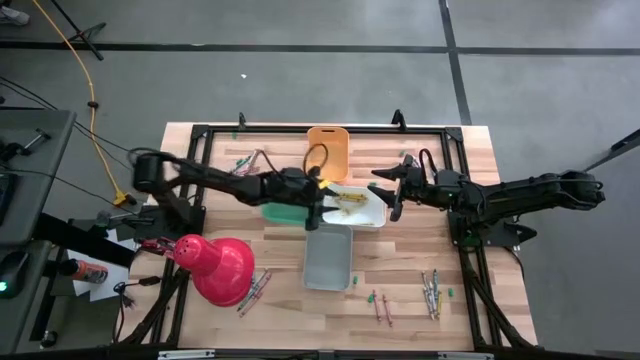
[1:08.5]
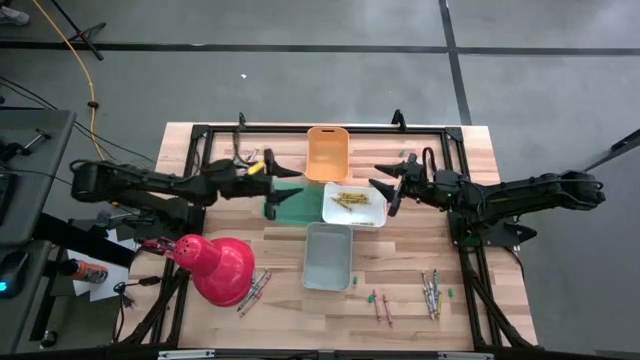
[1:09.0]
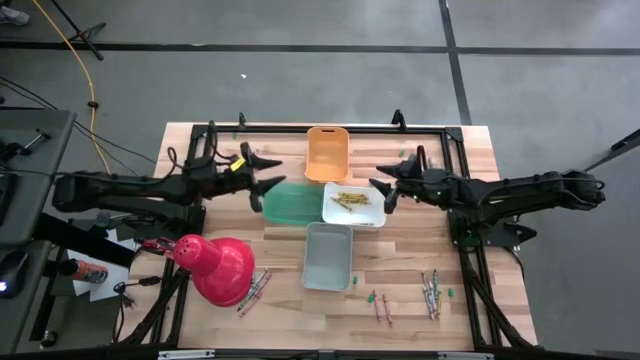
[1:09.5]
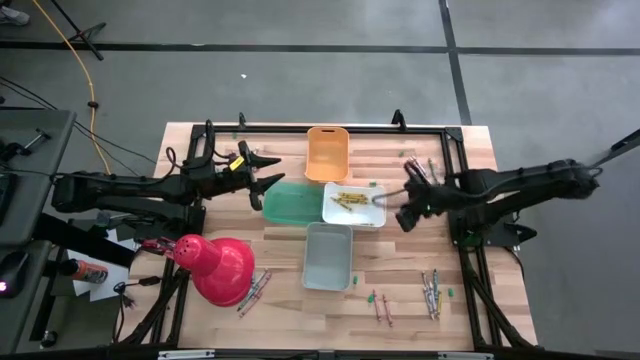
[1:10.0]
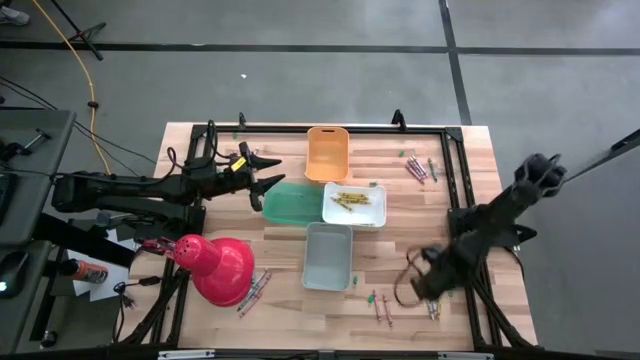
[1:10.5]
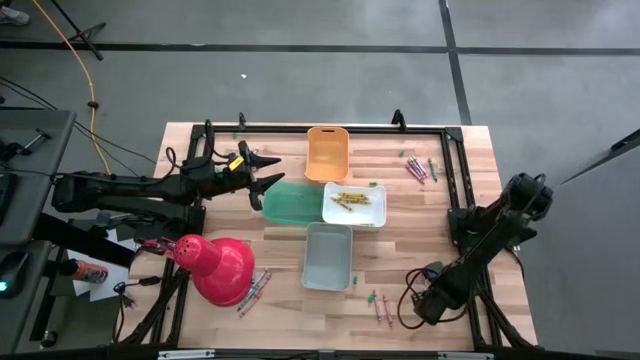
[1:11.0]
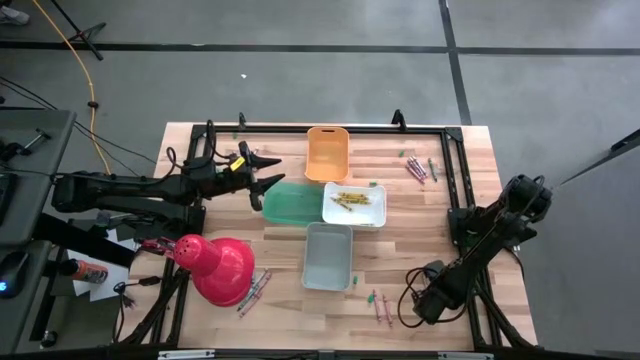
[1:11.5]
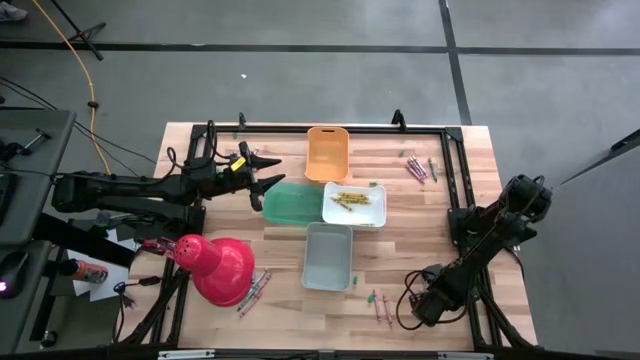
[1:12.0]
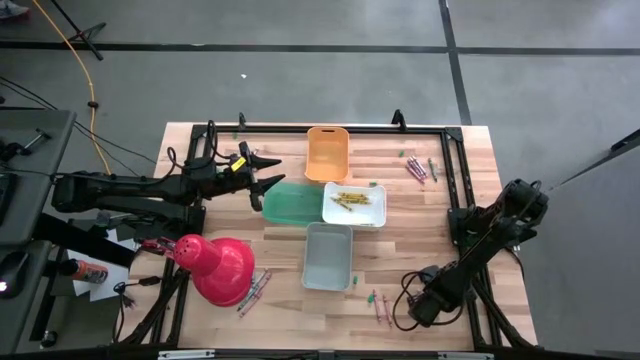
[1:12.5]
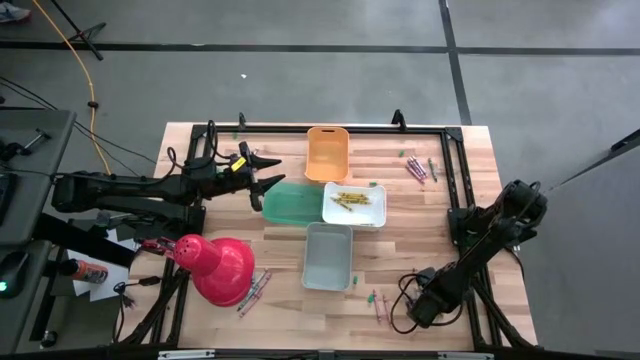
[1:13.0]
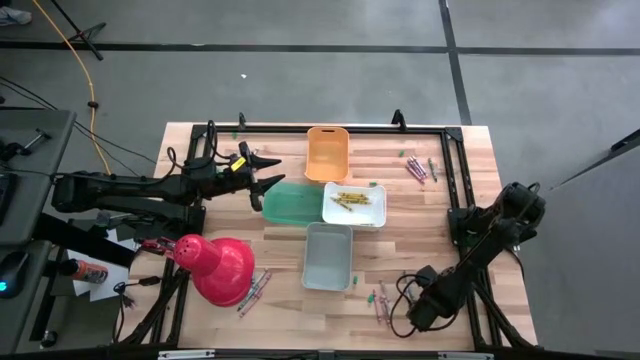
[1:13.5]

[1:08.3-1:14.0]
Task: Sort crayons
Put the yellow crayon into the white bin

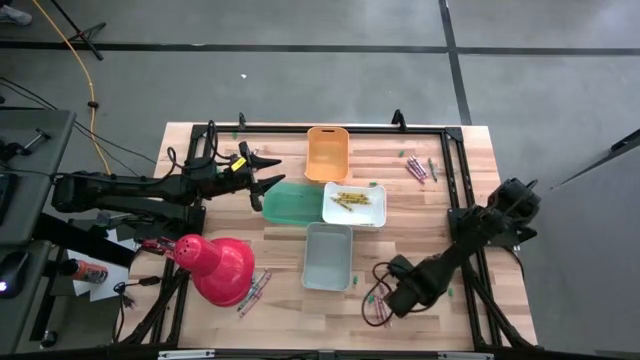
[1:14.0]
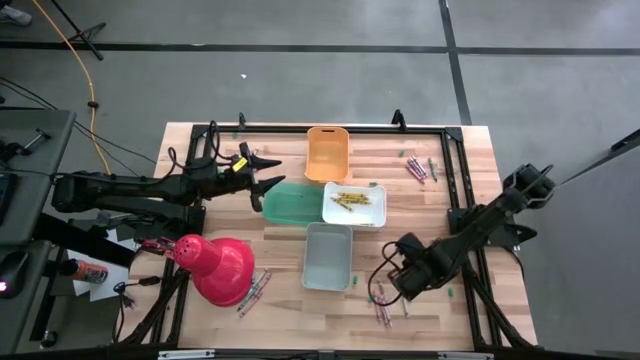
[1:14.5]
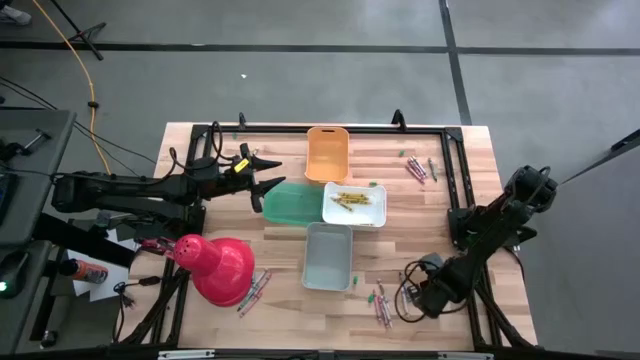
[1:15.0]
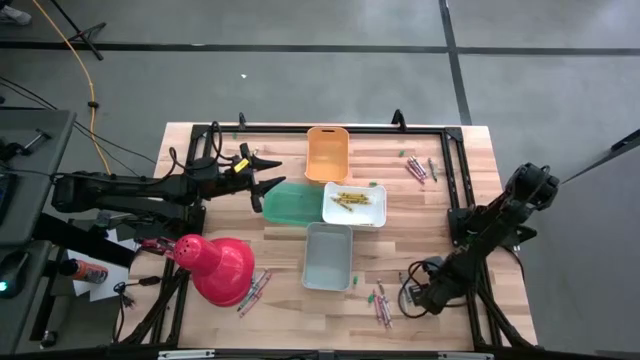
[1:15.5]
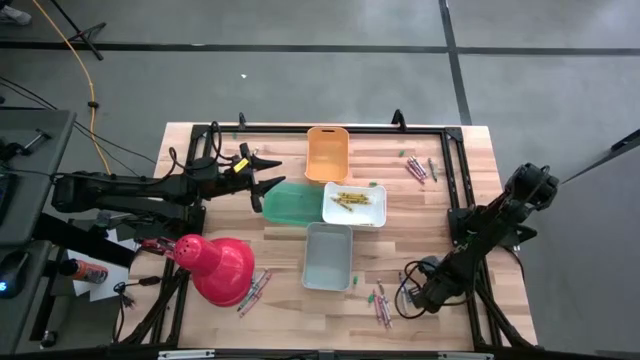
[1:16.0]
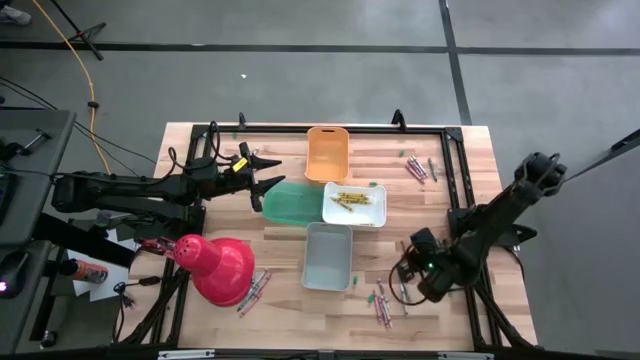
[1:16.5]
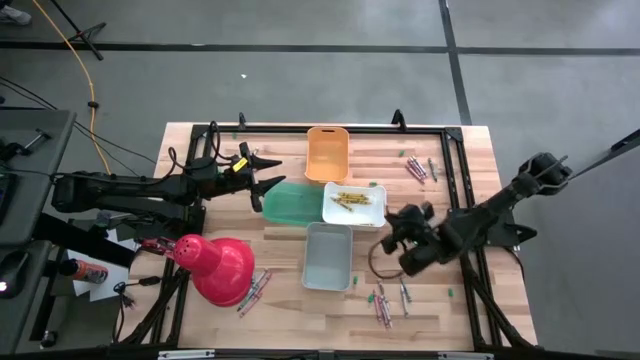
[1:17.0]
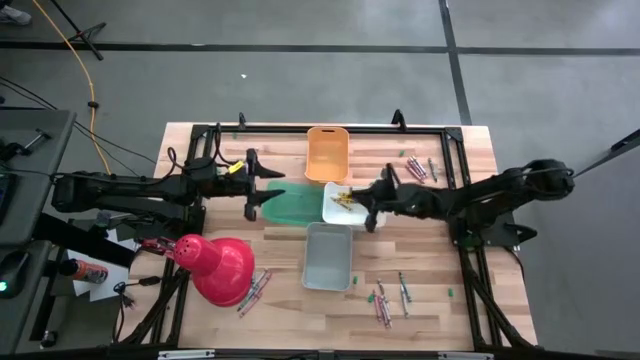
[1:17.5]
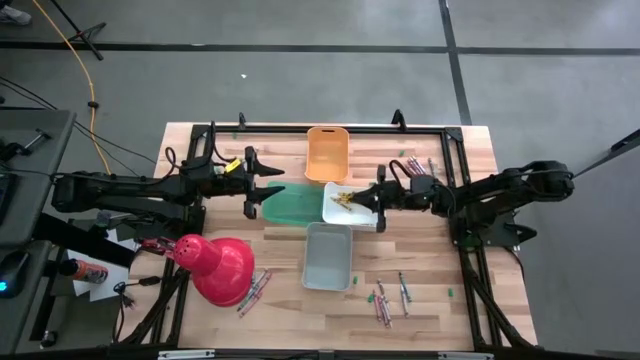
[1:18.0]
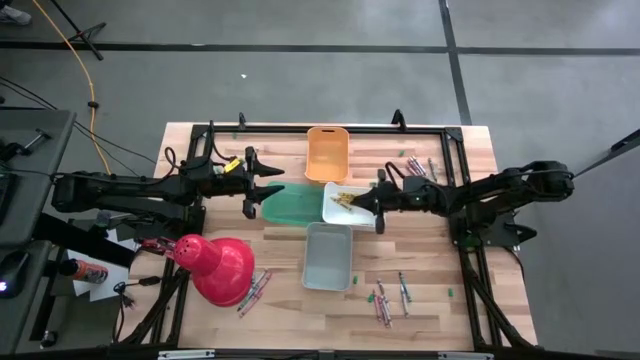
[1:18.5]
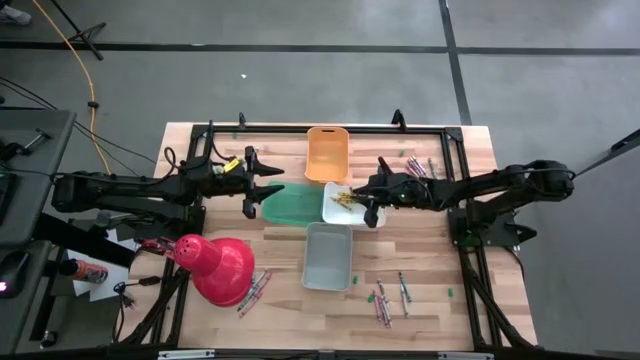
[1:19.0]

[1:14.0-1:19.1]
Put the yellow crayon into the white bin

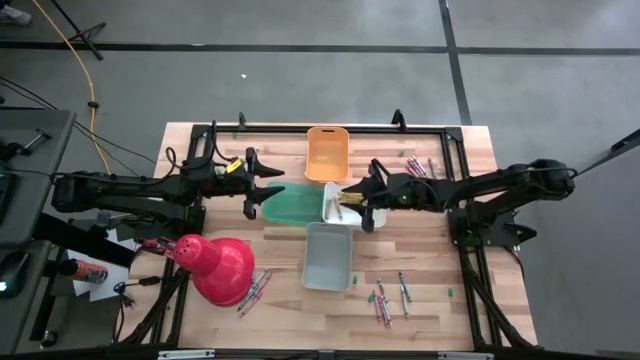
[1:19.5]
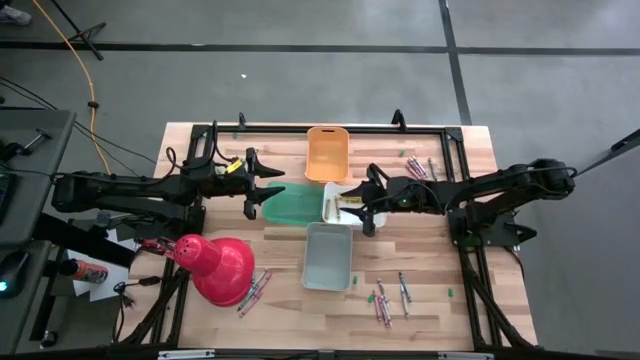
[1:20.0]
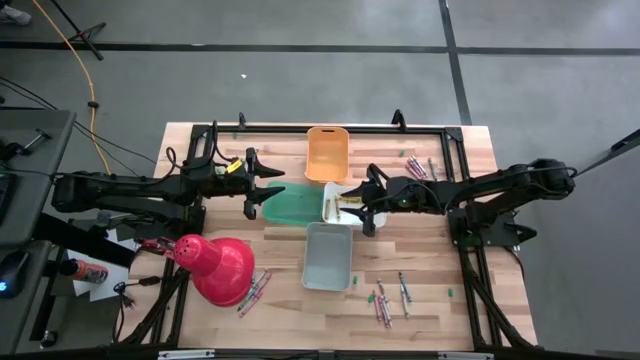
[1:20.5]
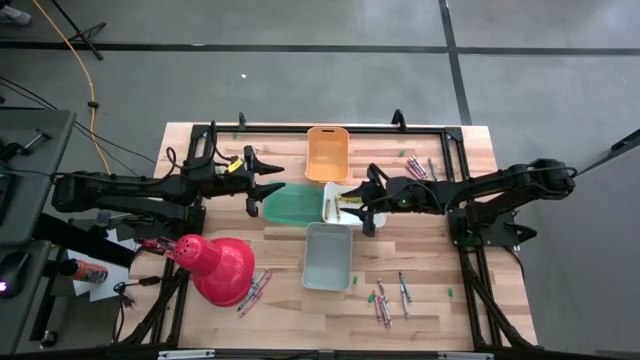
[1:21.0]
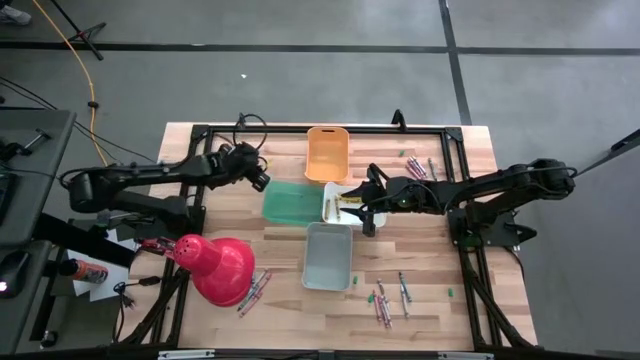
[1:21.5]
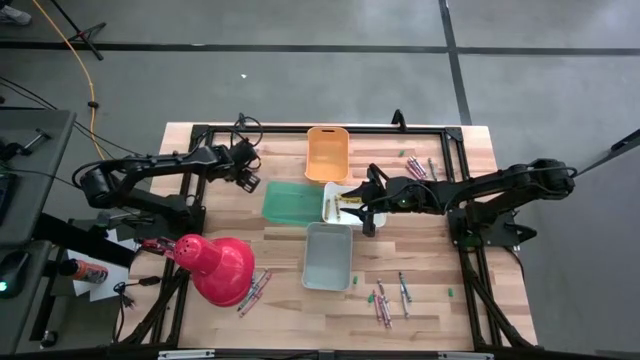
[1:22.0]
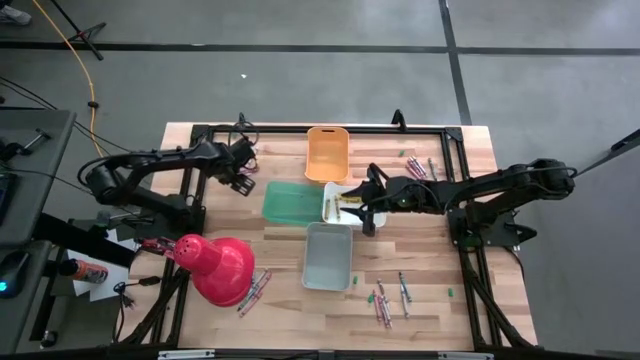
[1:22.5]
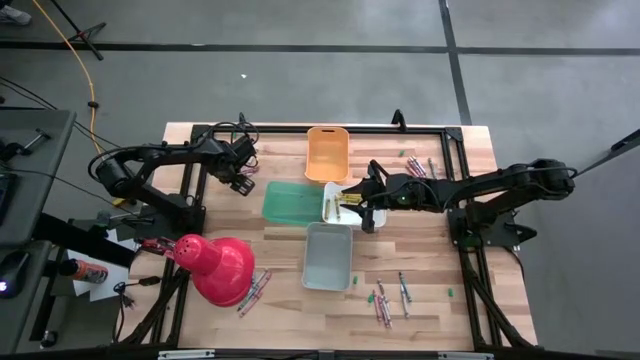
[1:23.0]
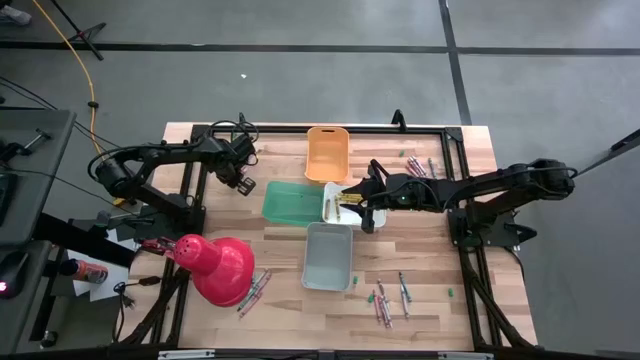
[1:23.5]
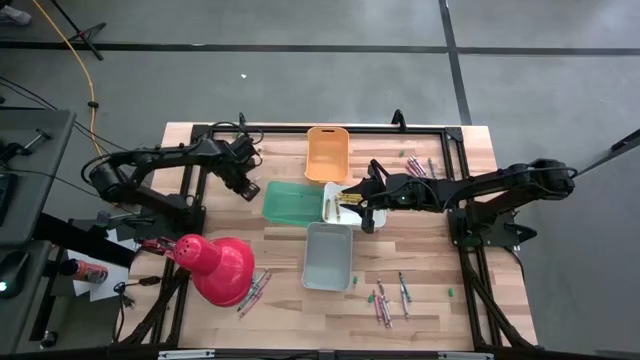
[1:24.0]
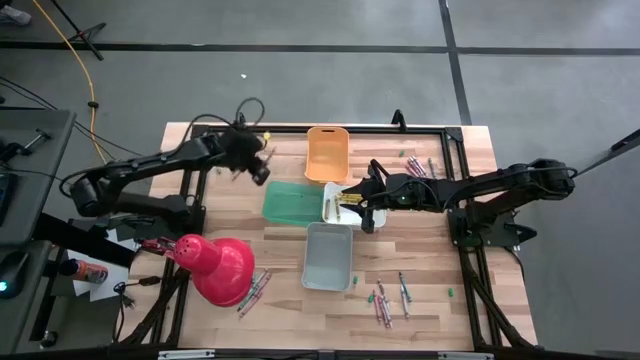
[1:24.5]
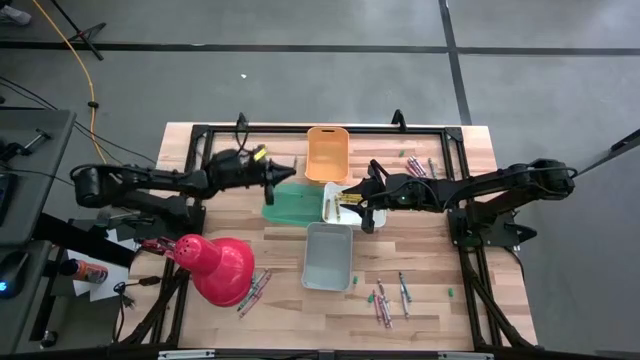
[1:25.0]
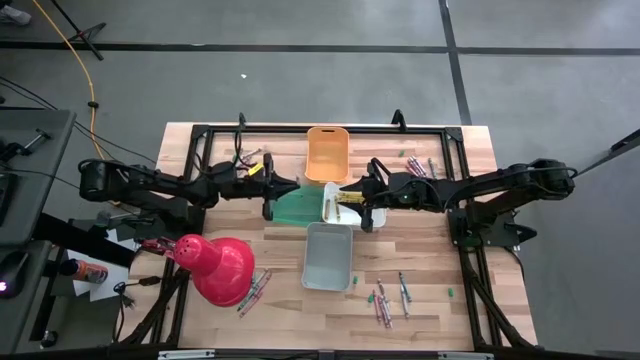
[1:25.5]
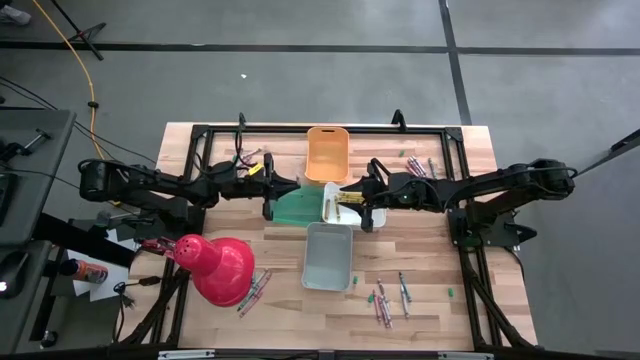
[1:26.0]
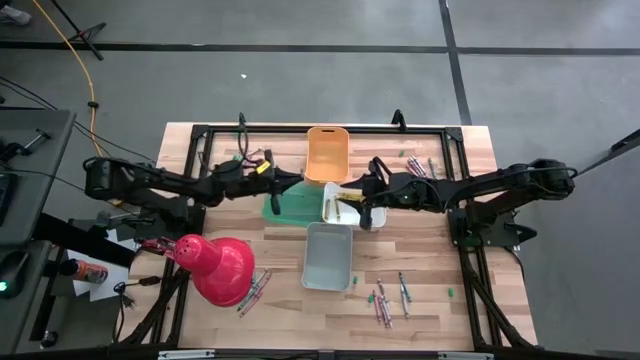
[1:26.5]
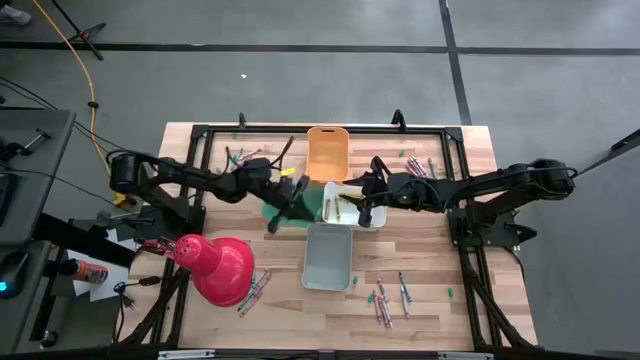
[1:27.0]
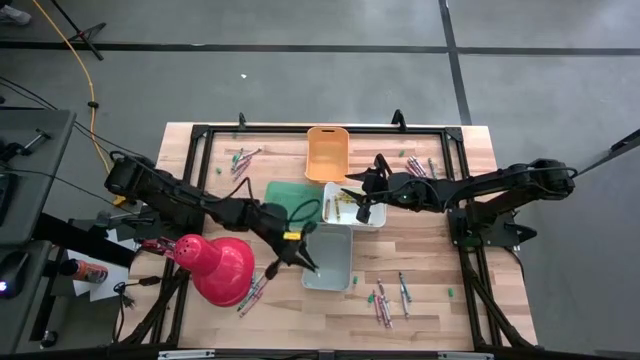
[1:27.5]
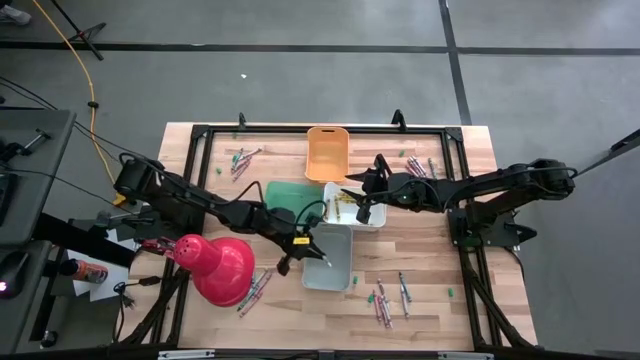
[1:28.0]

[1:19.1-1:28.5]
Put the white crayon into the gray bin

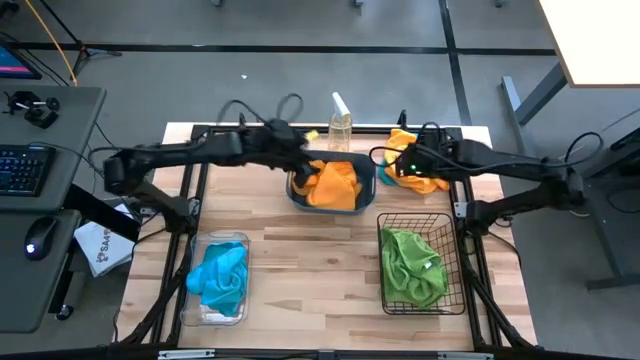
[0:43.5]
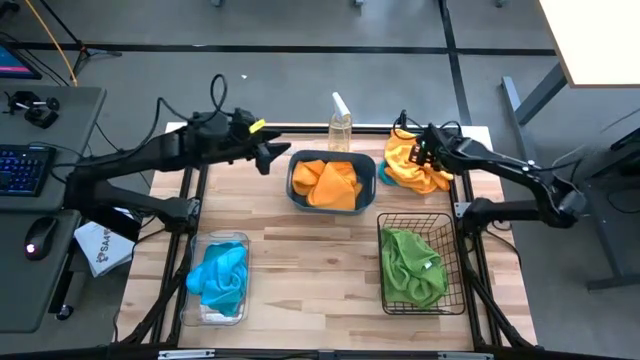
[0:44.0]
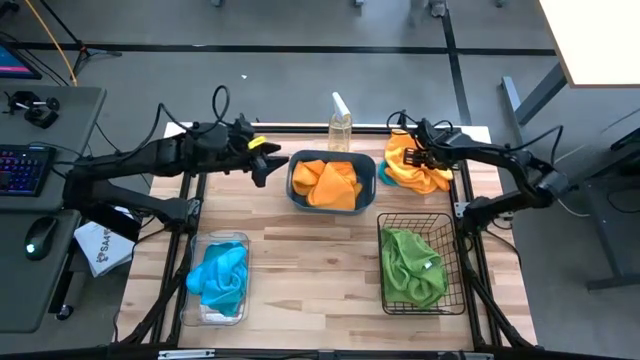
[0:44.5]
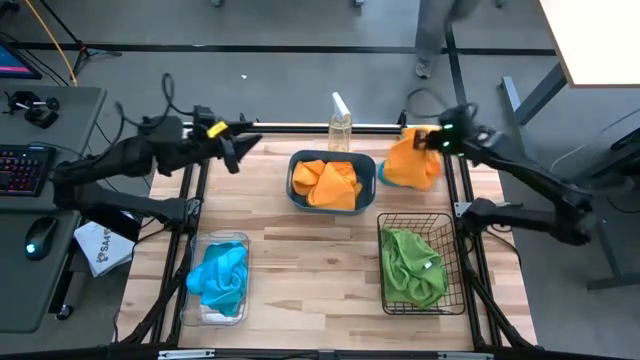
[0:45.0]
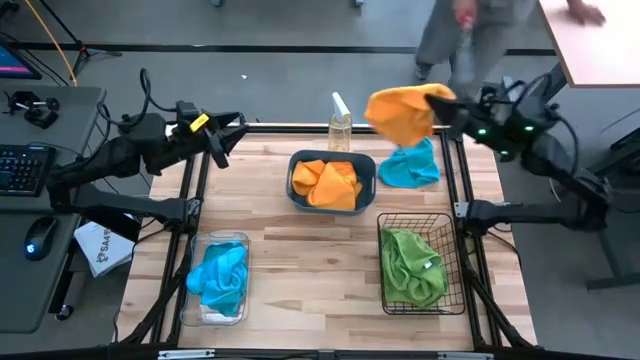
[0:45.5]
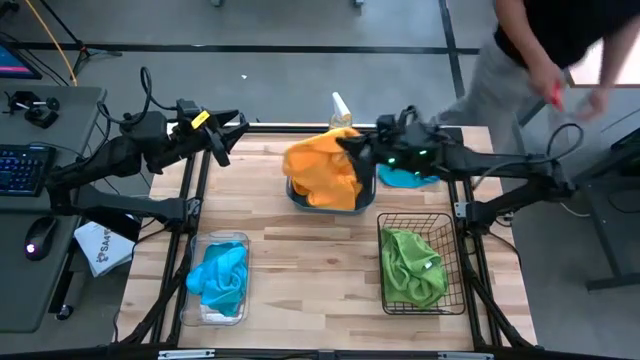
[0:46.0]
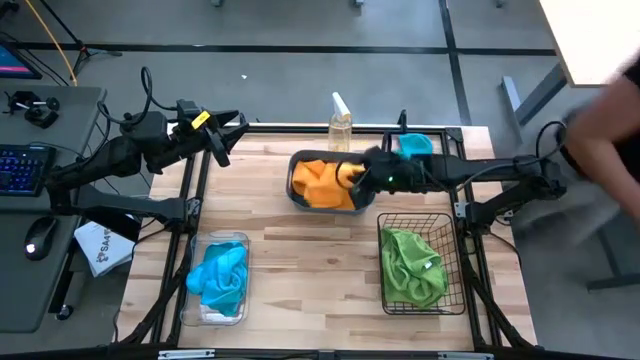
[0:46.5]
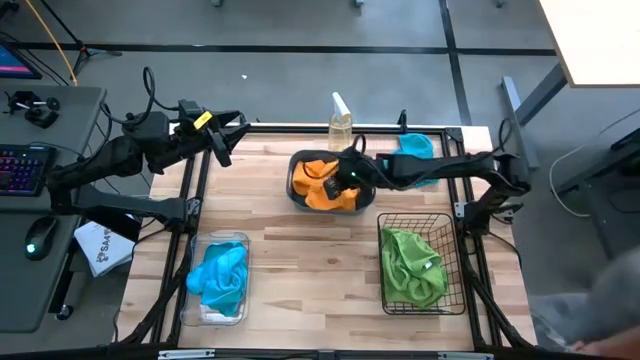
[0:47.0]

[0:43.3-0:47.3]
Task: Sort microfiber towel by color & place in baskets
Put the yellow towel into the blue bin
